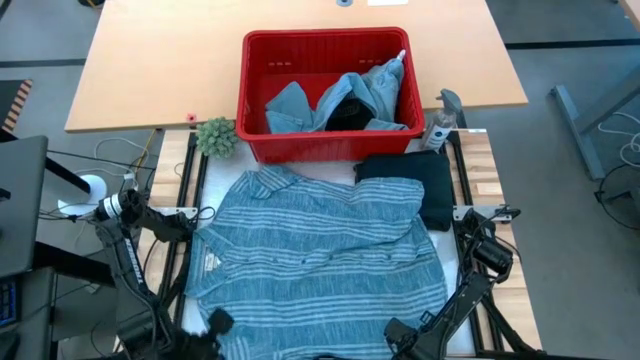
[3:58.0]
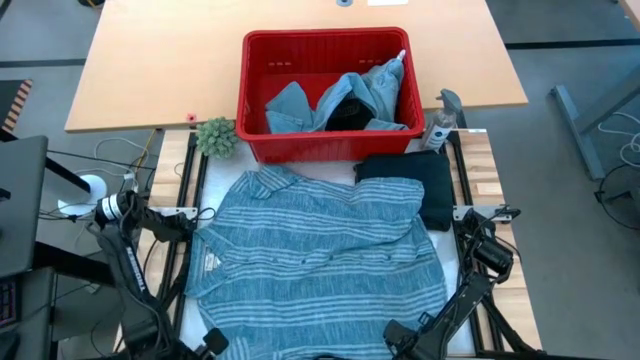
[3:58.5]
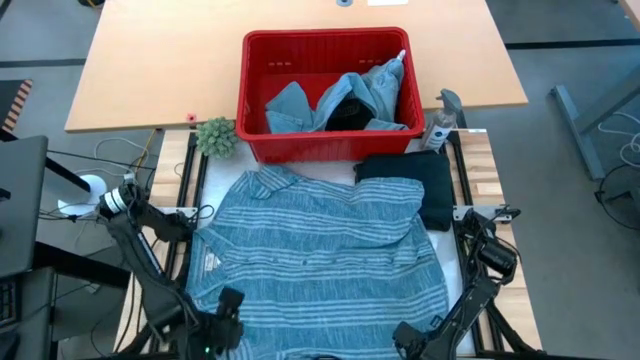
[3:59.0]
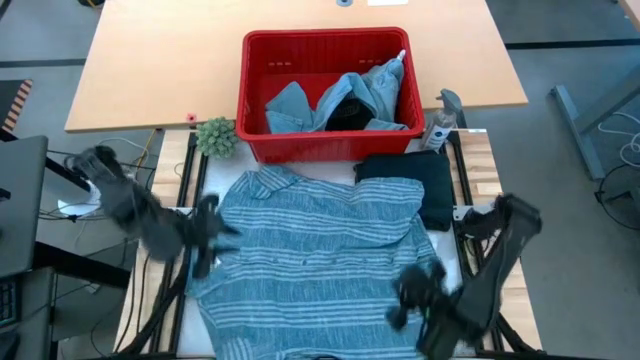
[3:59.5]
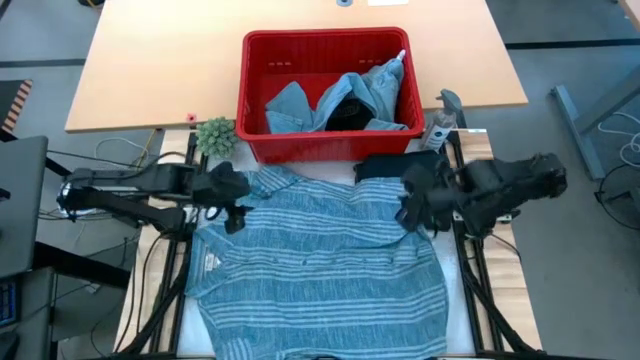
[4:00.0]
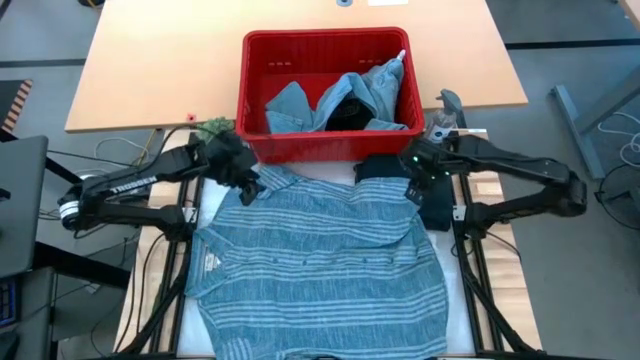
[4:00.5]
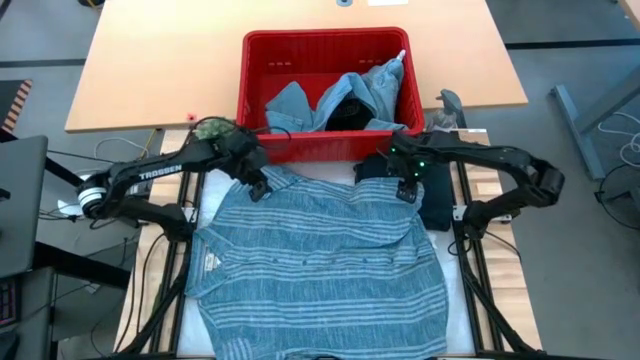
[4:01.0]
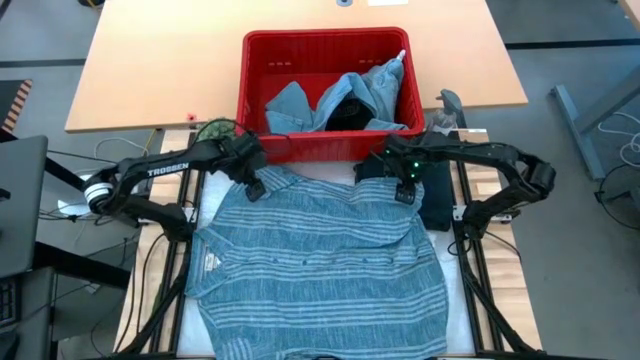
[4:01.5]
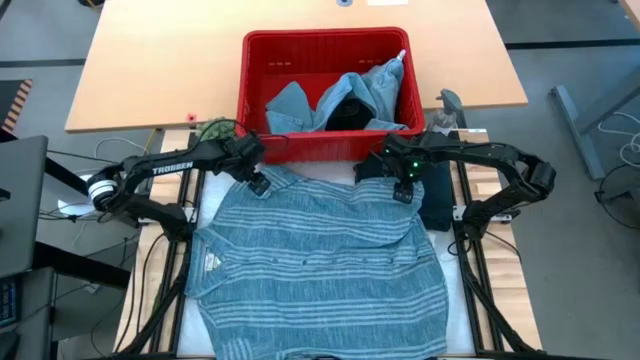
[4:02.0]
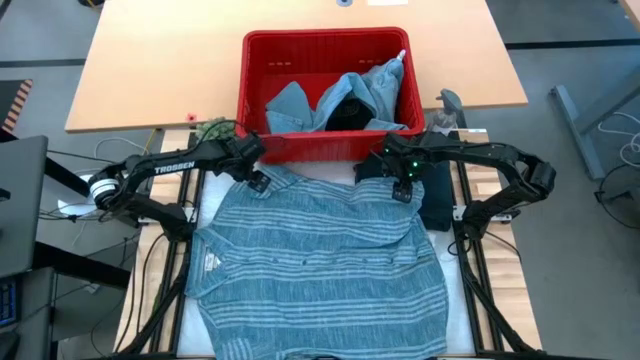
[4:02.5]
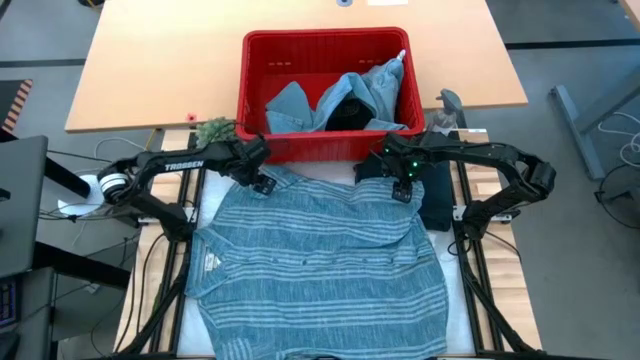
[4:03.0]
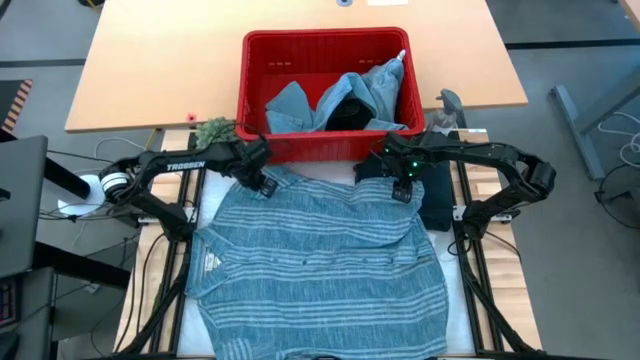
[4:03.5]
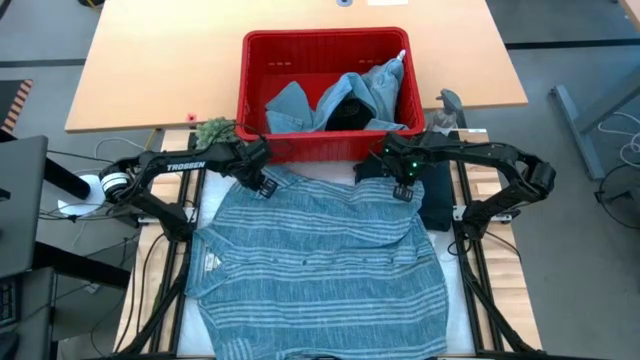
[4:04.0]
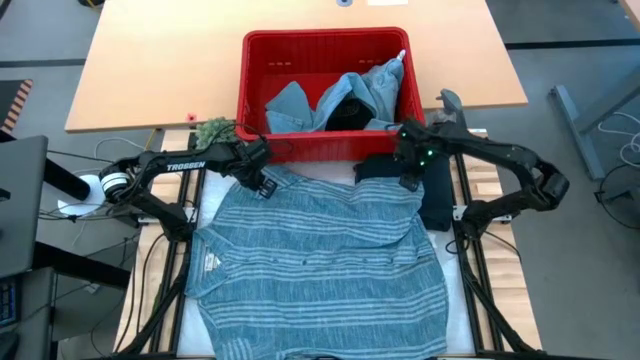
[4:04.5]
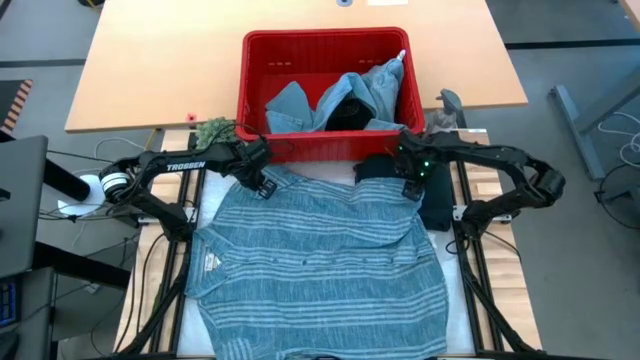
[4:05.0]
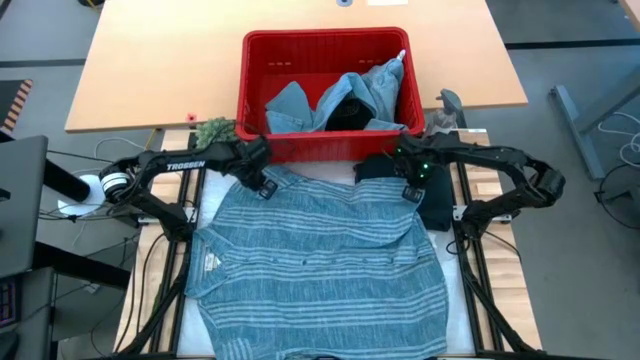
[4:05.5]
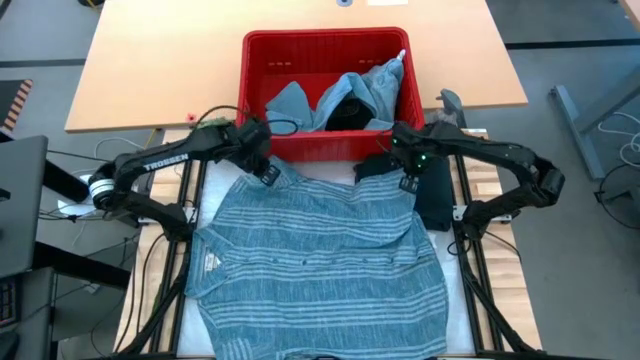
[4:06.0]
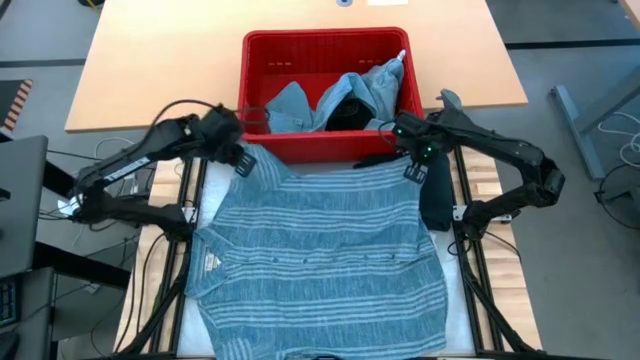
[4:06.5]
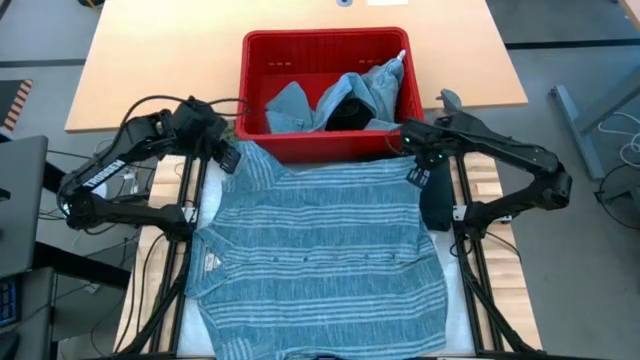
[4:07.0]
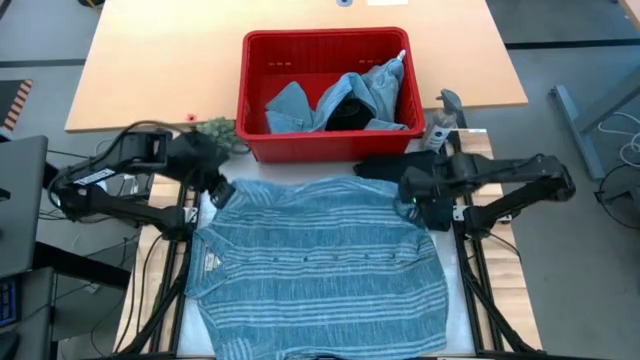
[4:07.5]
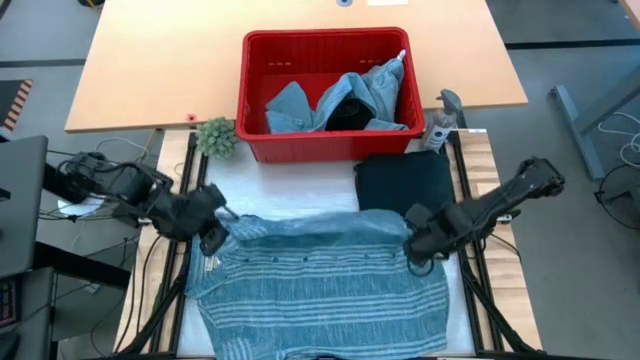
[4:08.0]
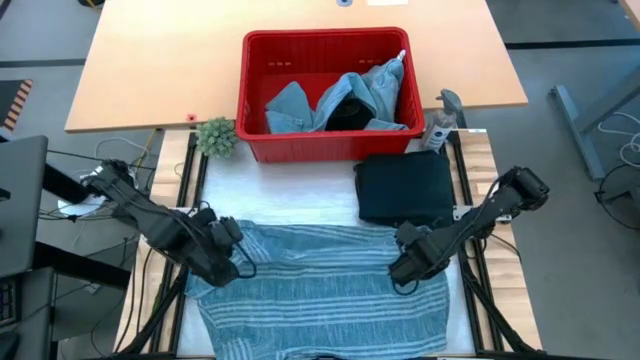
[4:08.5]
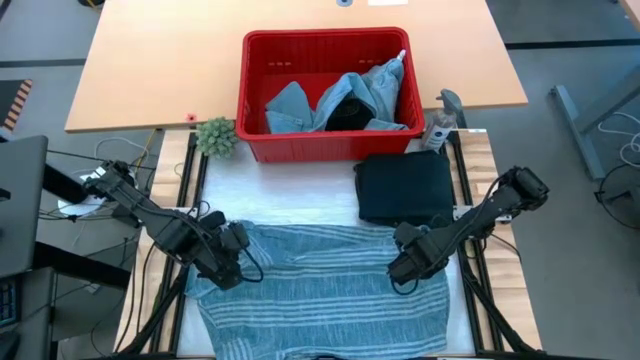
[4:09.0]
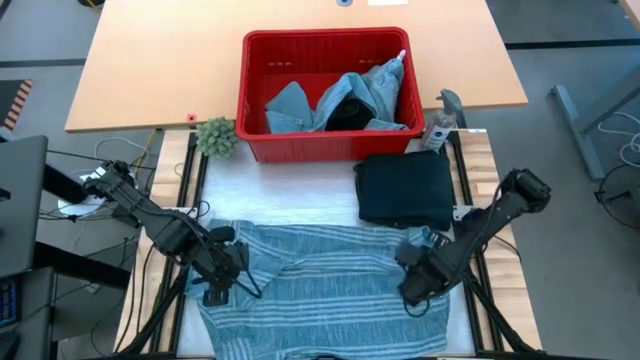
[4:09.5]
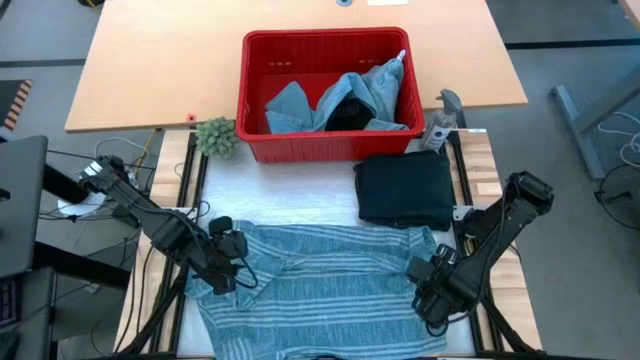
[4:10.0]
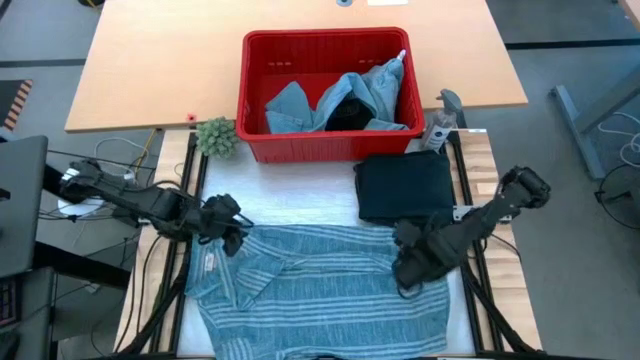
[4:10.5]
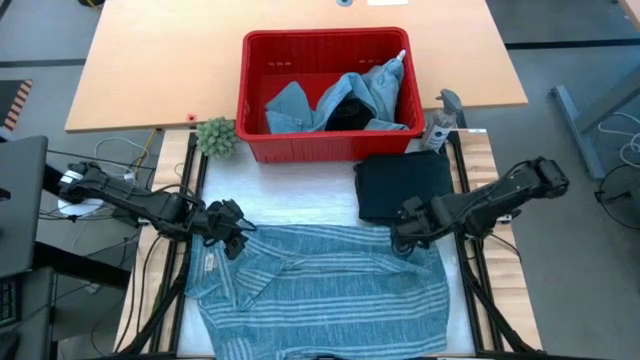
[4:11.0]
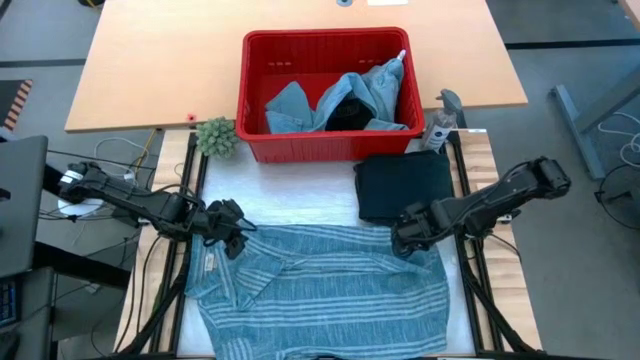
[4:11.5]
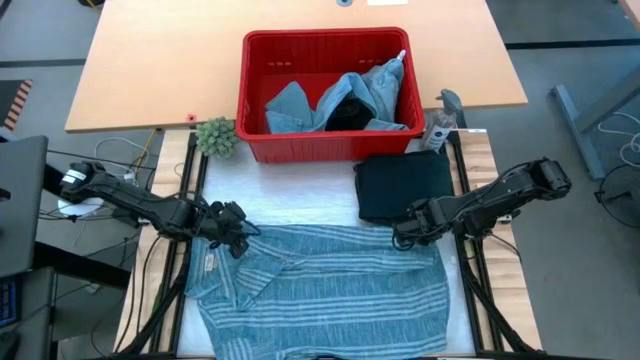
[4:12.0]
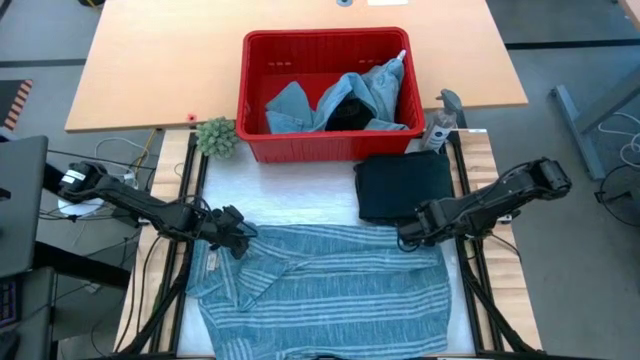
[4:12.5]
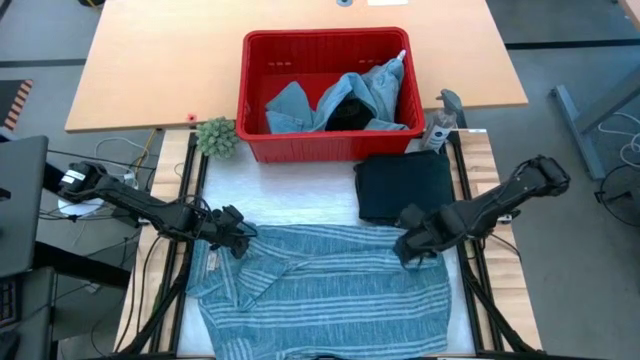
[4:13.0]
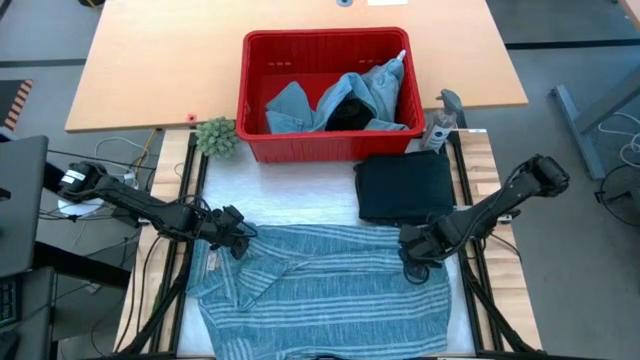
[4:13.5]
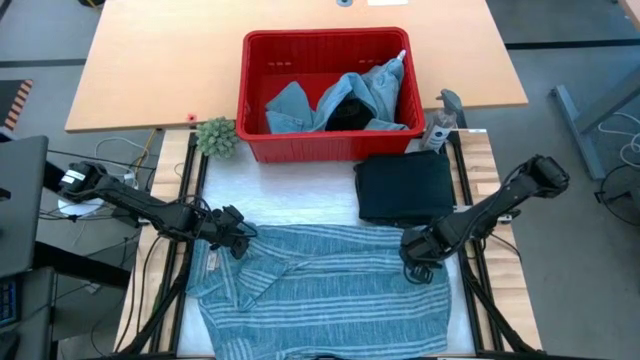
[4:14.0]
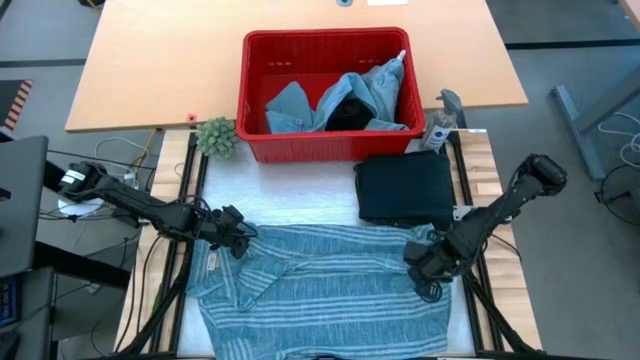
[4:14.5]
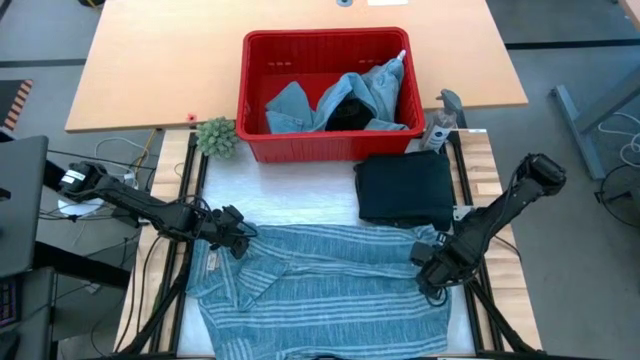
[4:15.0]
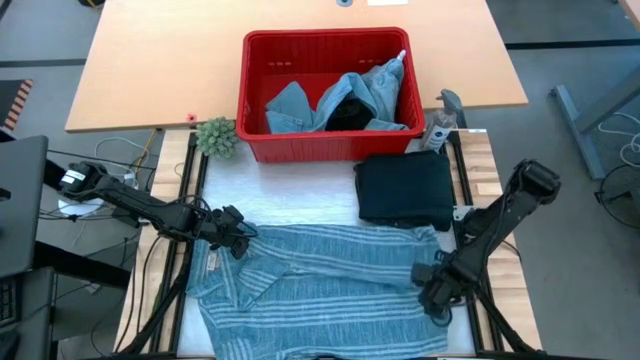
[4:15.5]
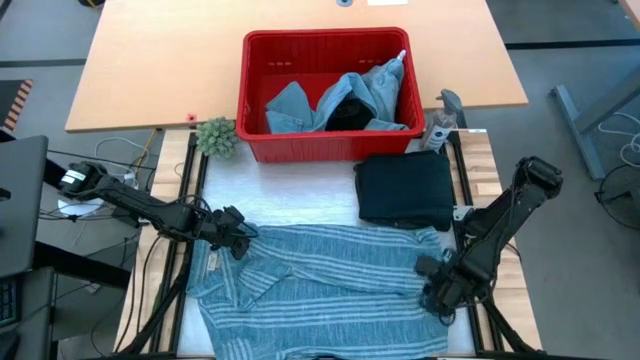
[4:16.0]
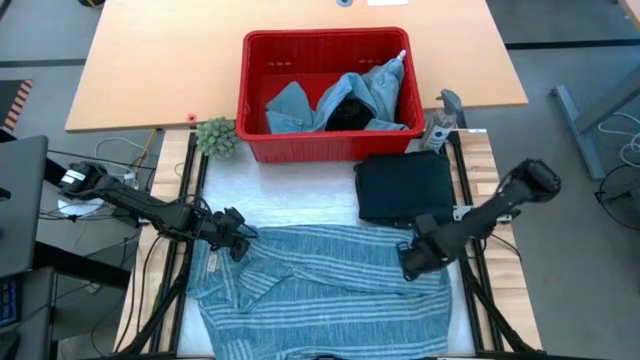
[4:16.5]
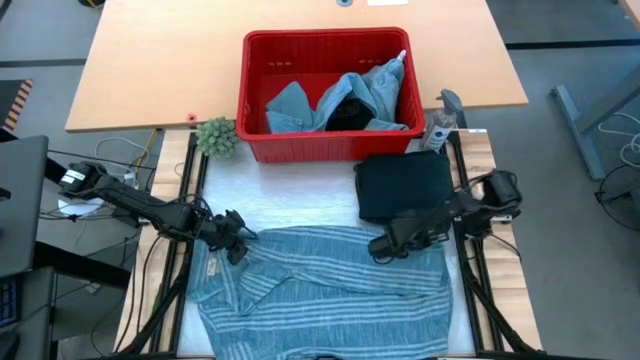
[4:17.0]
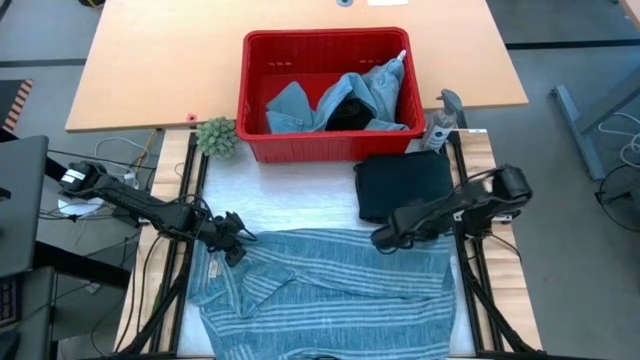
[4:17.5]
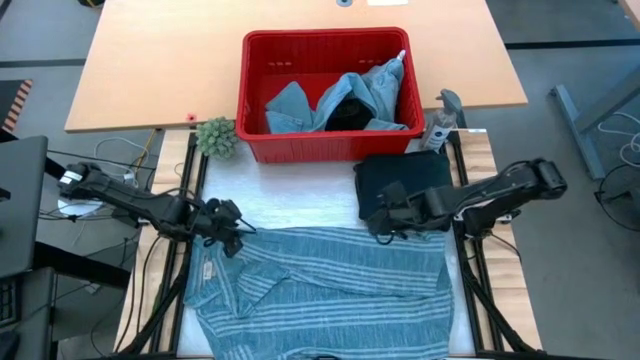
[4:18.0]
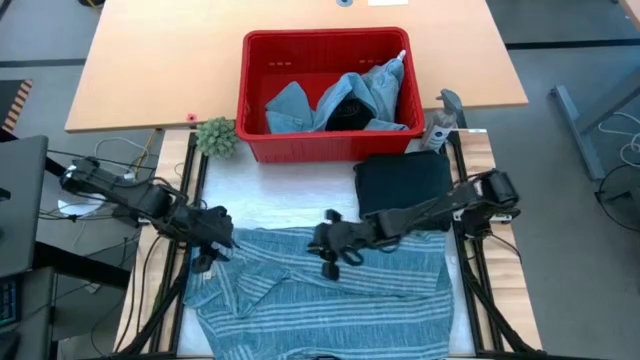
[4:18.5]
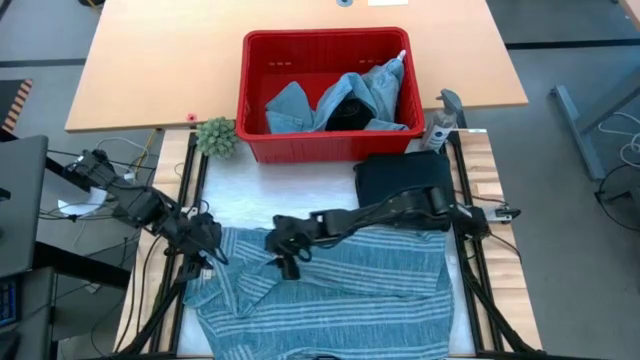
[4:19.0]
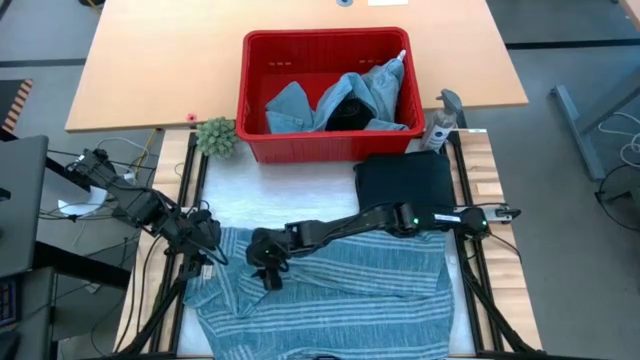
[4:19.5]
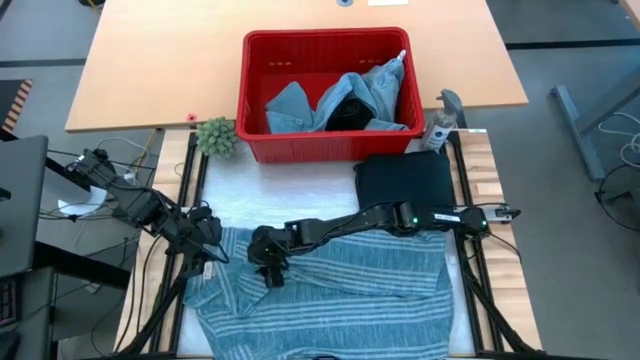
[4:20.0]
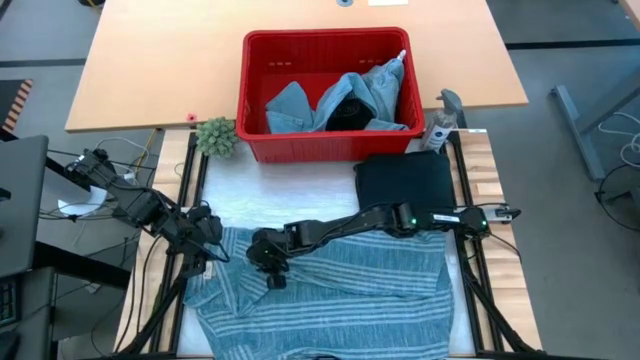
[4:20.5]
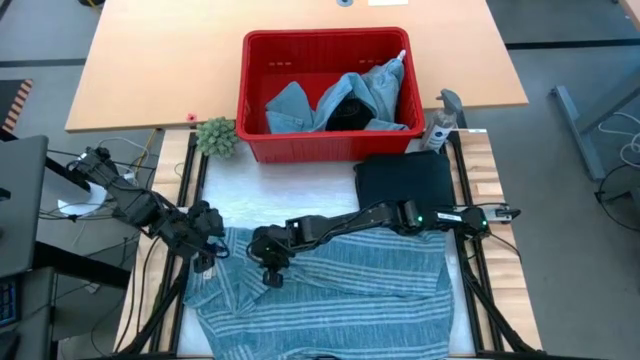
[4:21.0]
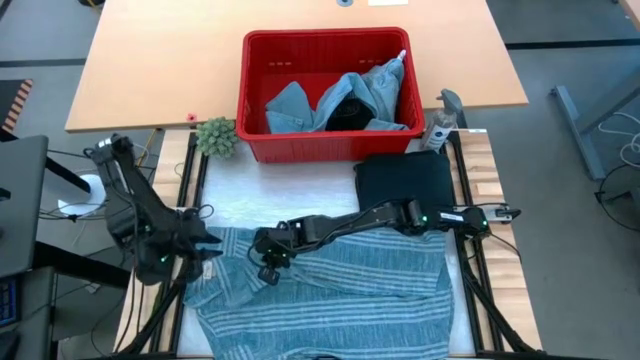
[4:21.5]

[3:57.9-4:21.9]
Task: Fold Laundry from Bin
Fold the blue polo shirt
